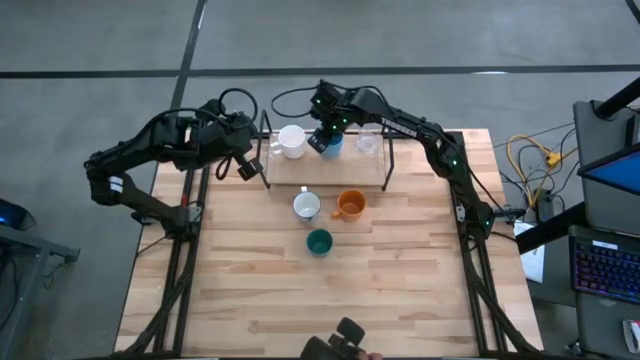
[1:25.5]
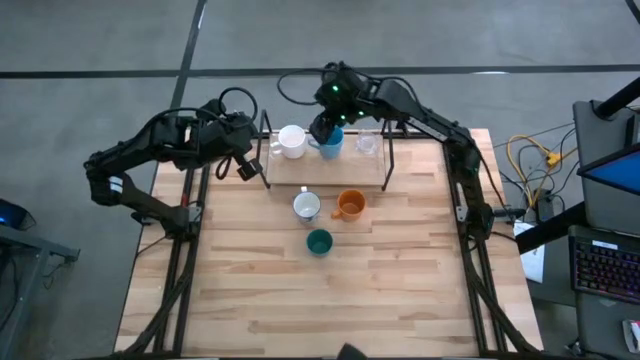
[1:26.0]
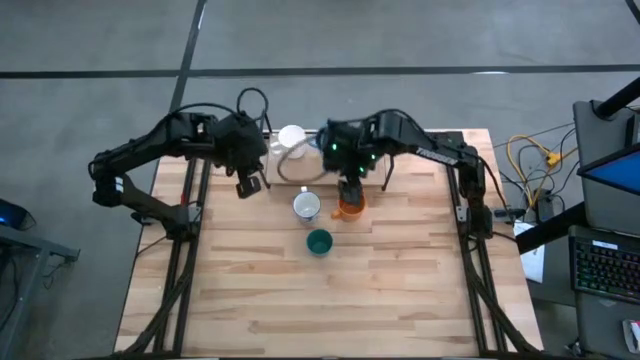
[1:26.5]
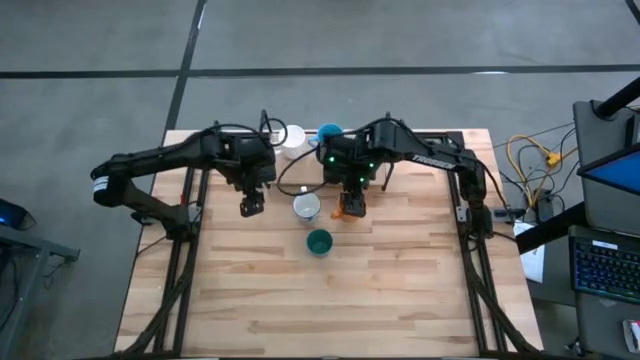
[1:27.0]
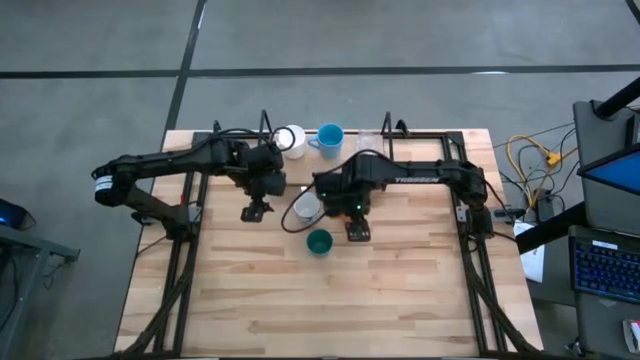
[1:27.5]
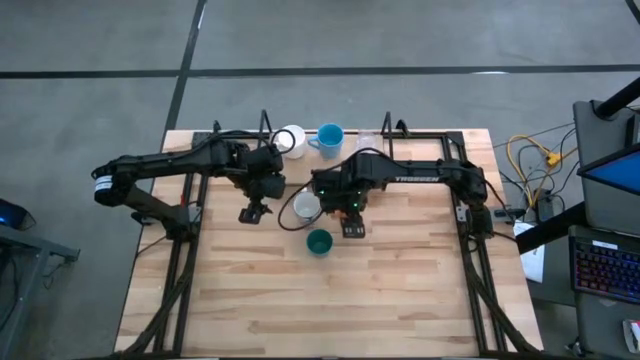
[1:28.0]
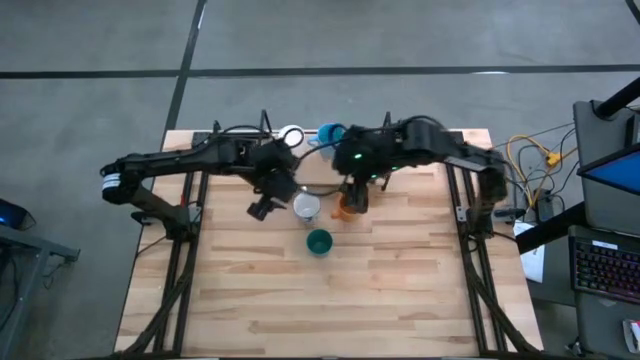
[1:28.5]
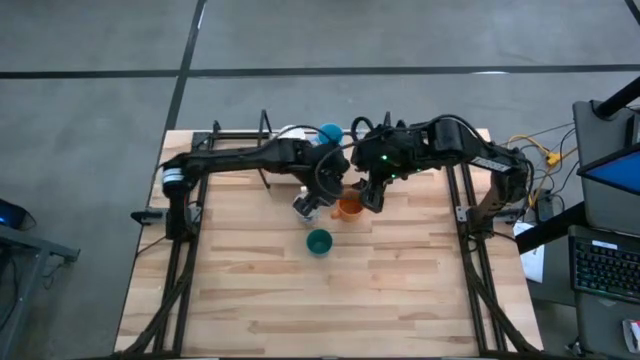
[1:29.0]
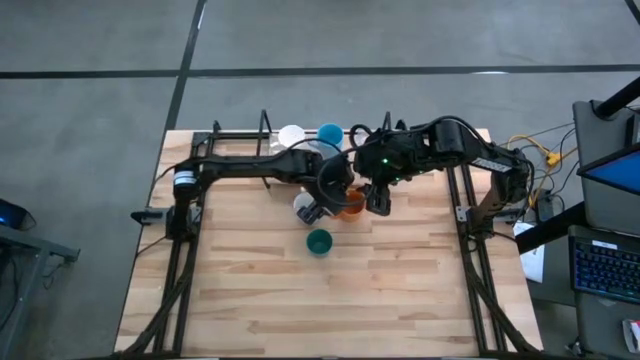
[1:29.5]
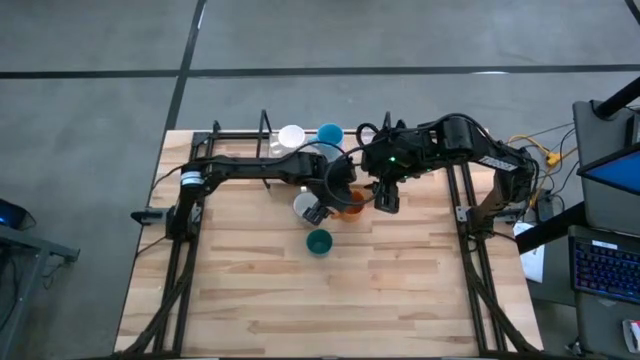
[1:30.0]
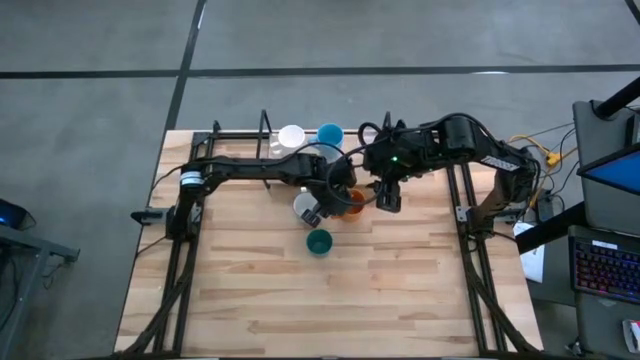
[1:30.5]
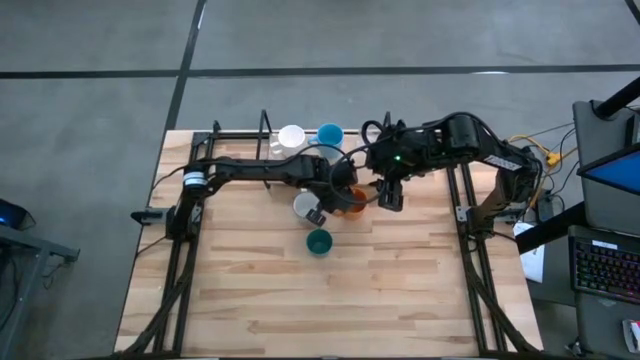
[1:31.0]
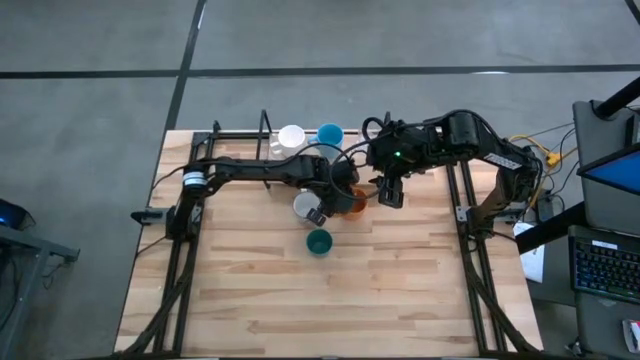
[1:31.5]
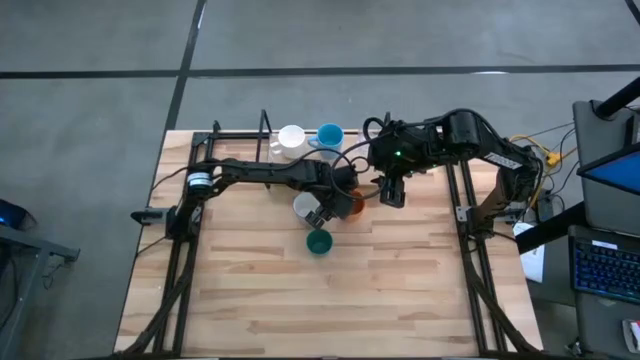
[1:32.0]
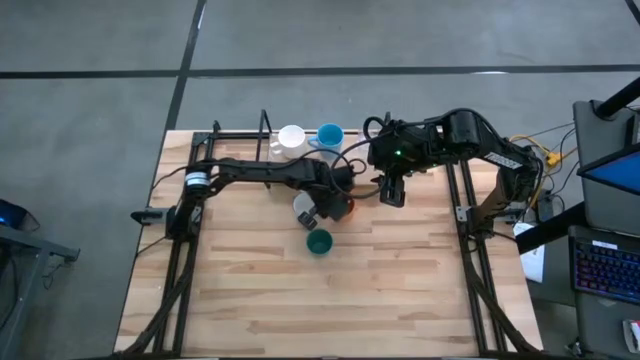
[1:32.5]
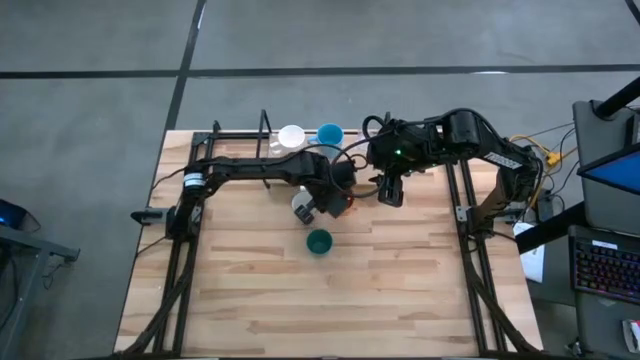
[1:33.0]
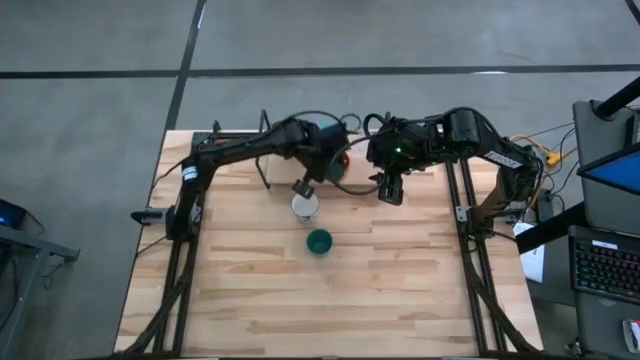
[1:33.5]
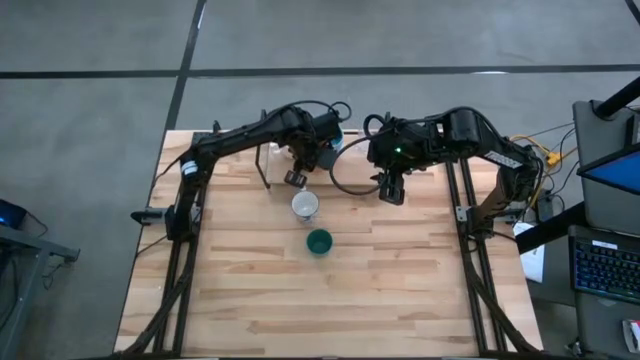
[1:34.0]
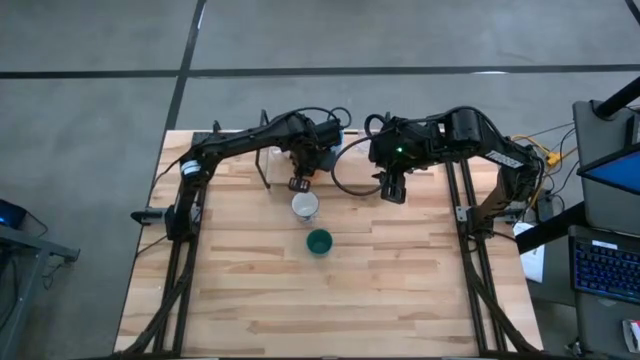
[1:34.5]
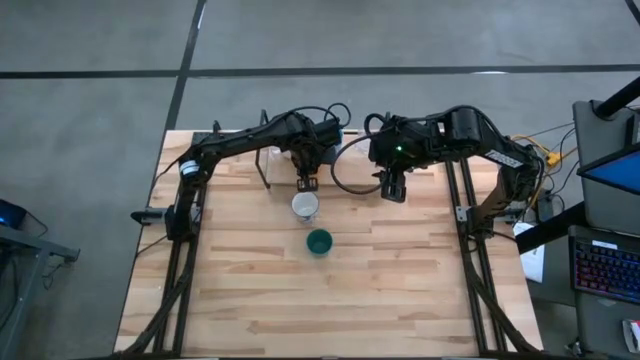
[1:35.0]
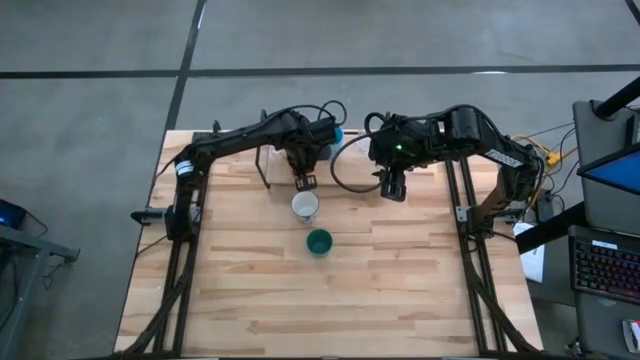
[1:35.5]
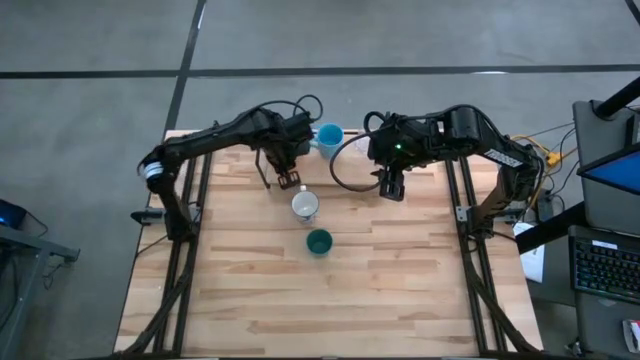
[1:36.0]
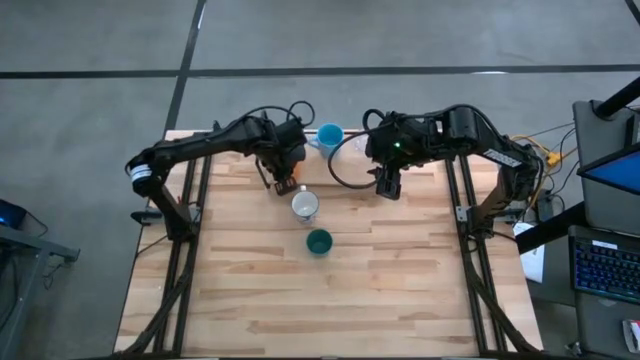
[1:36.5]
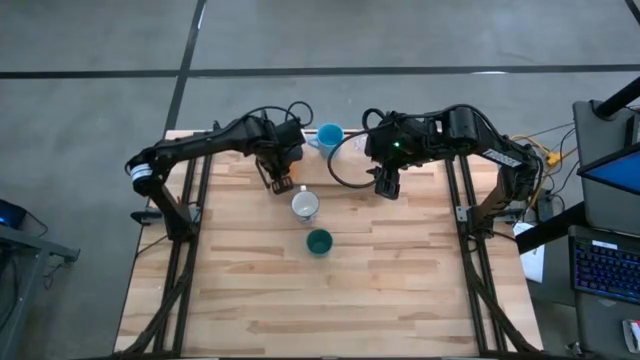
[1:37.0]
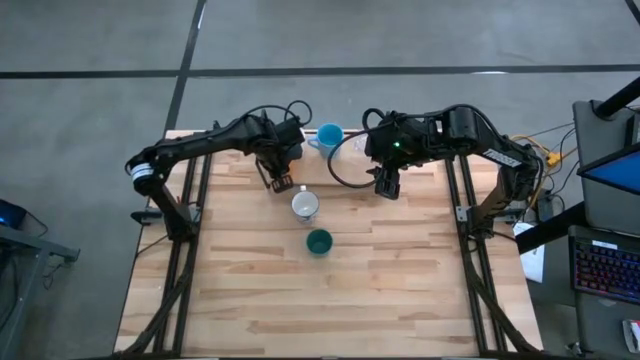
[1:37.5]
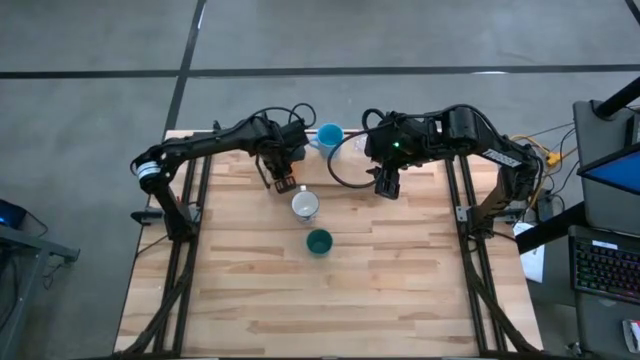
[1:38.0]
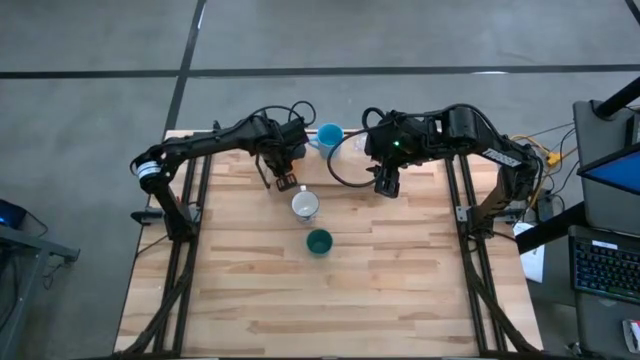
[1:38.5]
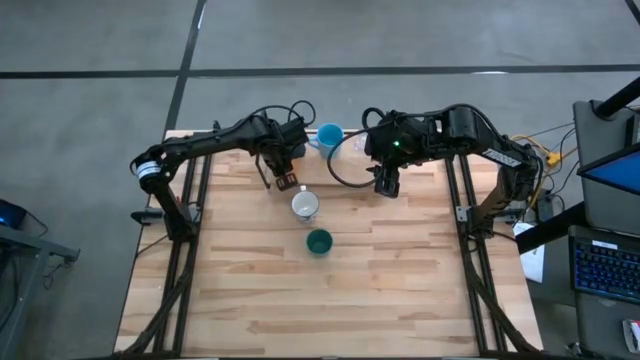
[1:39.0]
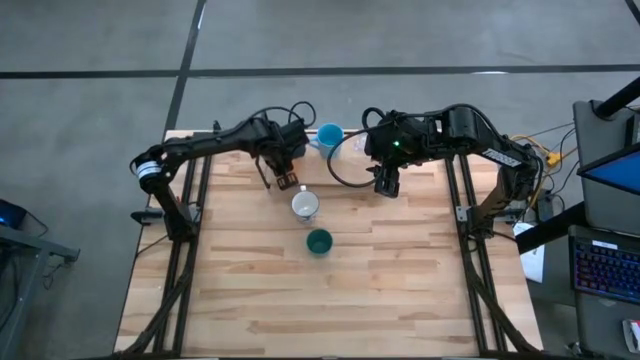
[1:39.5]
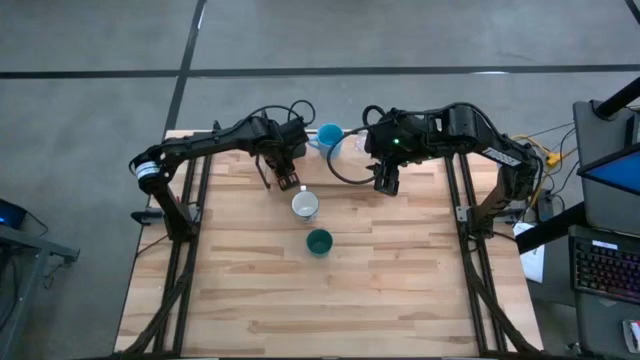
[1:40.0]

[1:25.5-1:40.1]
Task: Stack small to large cups/mugs on shelf
Put the orange mug on the shelf

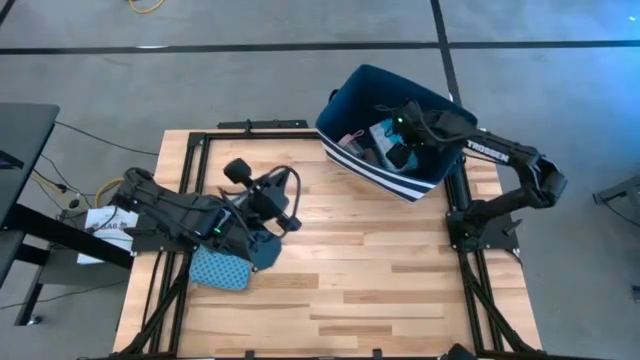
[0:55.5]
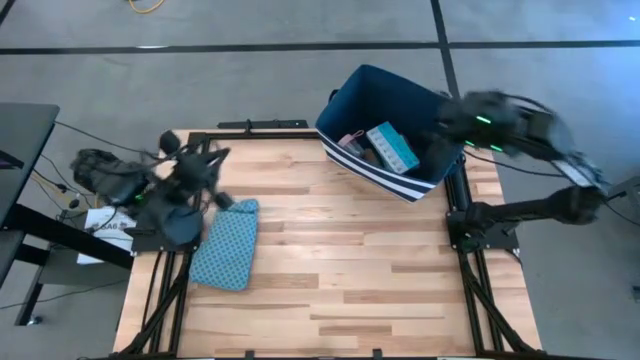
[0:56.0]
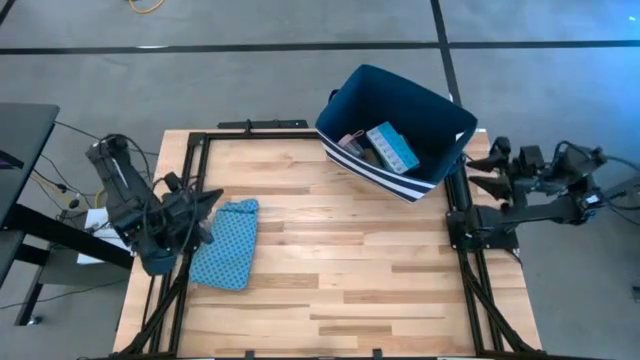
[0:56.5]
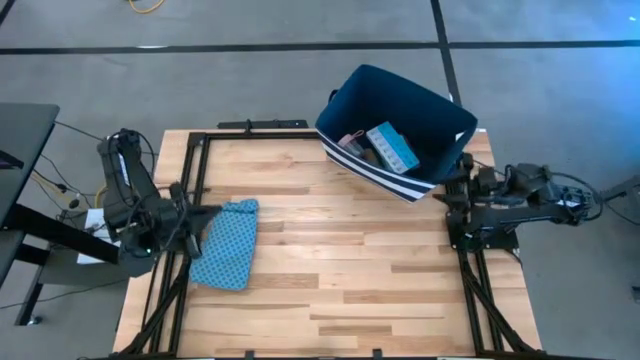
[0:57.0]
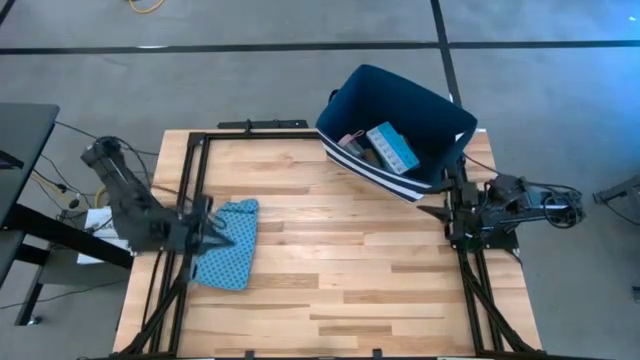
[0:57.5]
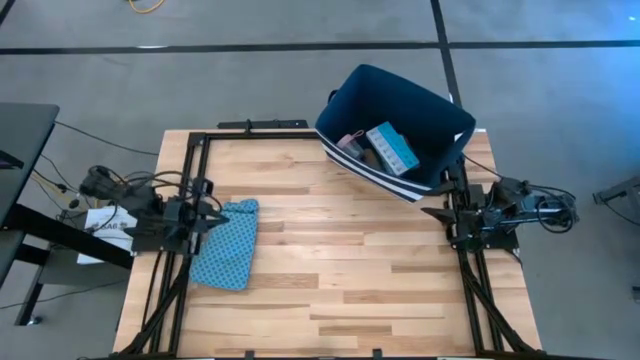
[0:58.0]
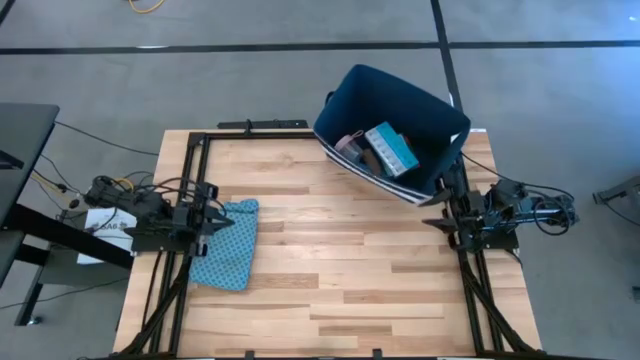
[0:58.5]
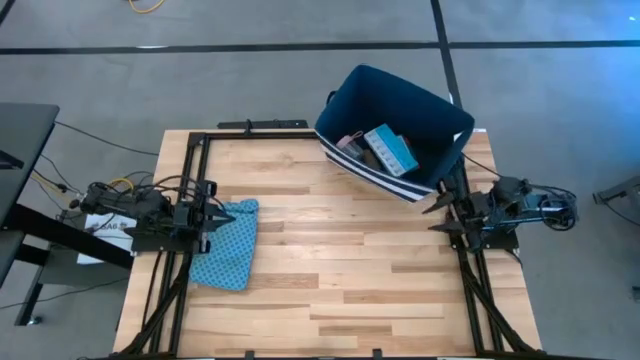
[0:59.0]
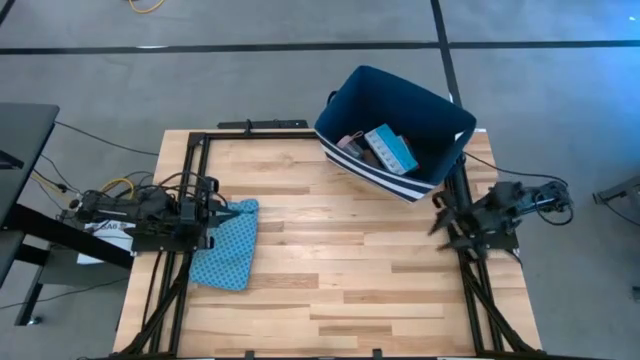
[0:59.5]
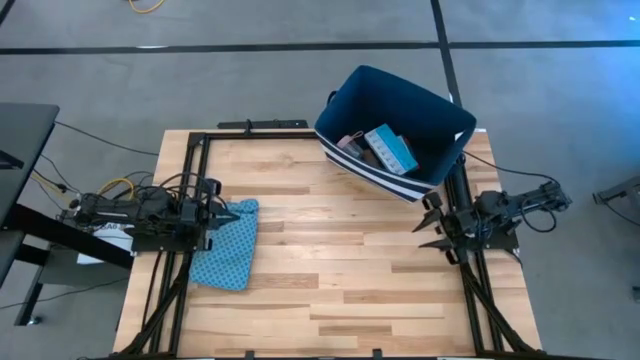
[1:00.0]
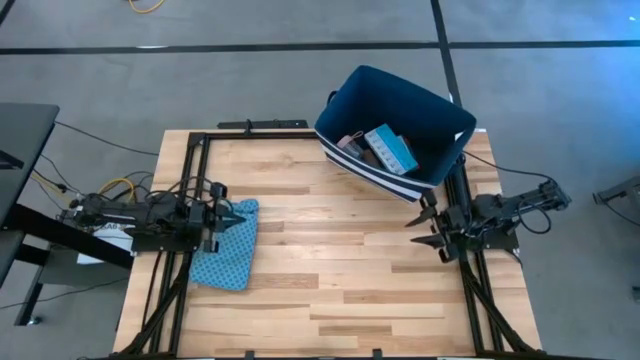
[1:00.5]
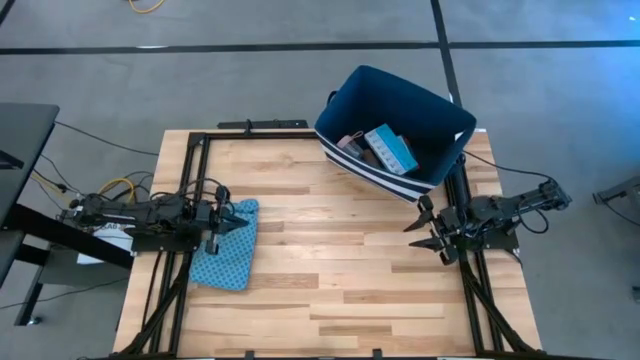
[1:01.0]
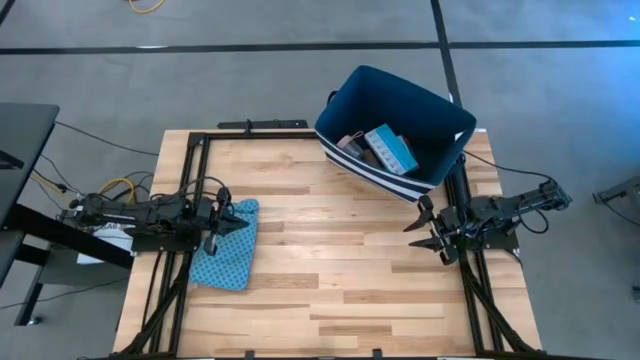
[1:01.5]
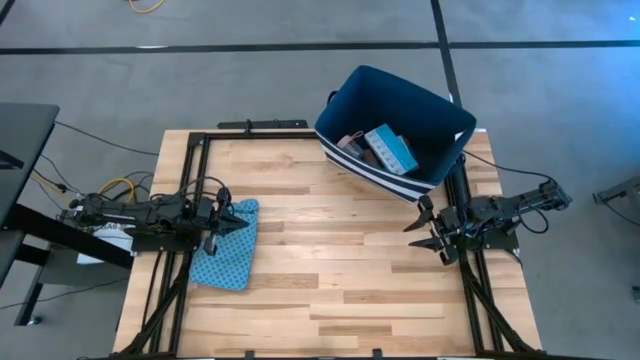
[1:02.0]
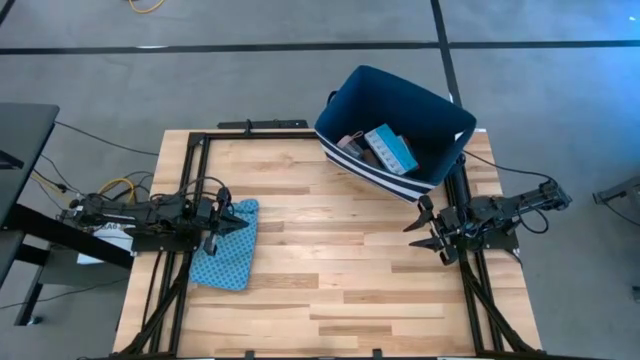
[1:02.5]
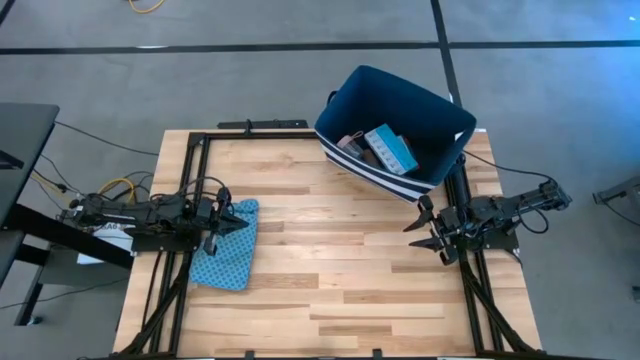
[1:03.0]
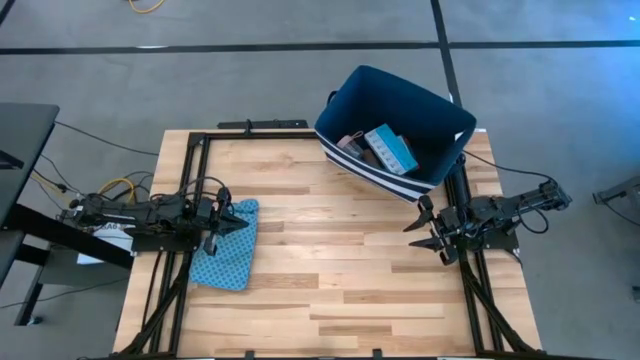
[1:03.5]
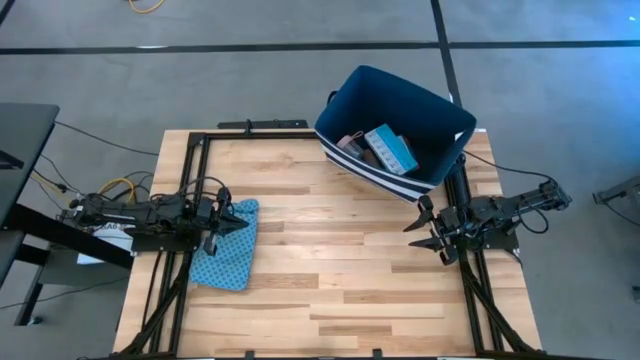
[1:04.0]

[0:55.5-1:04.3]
Task: Pick & place medical supplies in basket/bin
Return to Home Position
